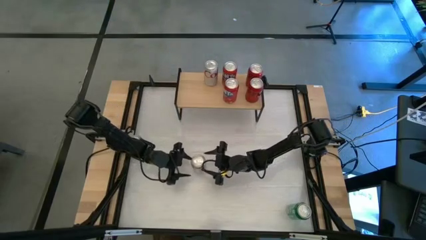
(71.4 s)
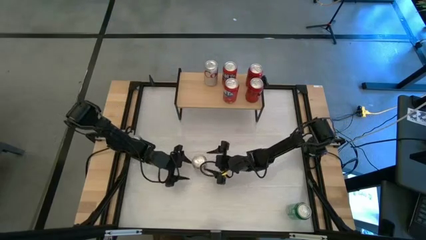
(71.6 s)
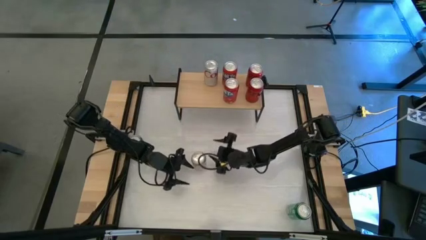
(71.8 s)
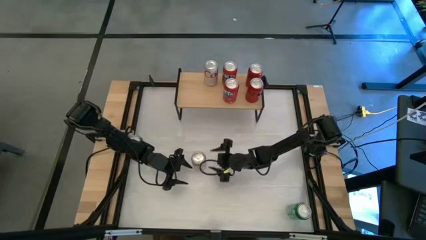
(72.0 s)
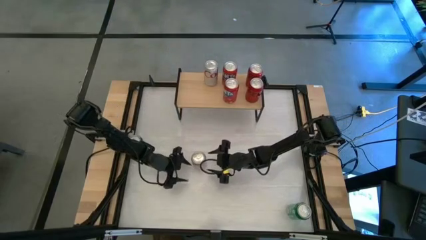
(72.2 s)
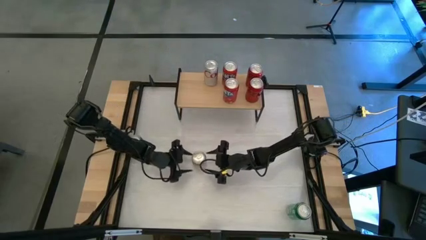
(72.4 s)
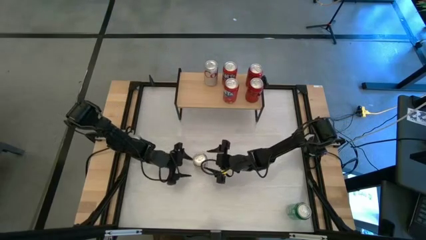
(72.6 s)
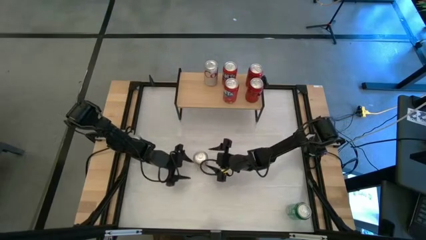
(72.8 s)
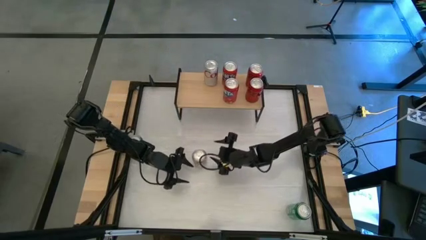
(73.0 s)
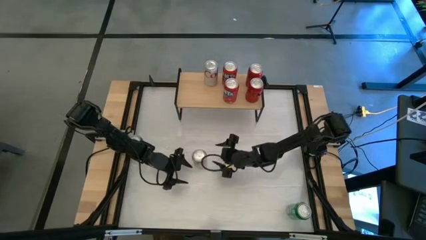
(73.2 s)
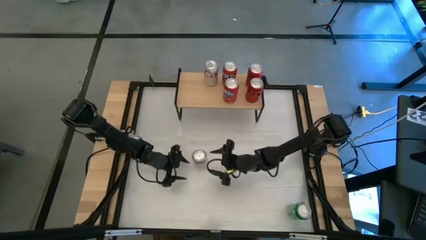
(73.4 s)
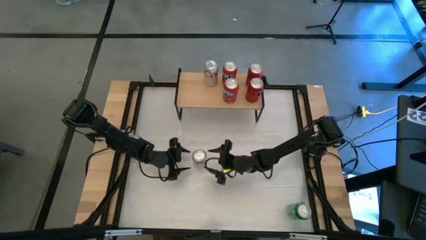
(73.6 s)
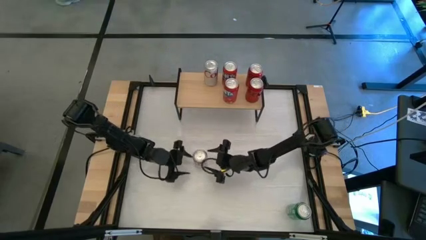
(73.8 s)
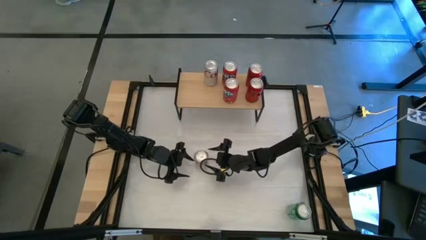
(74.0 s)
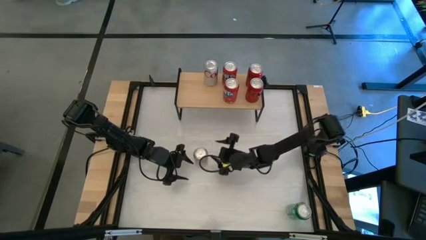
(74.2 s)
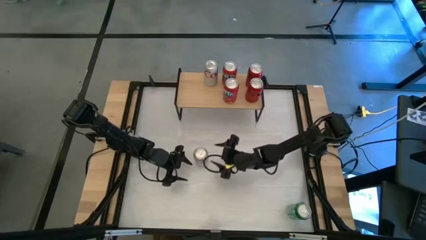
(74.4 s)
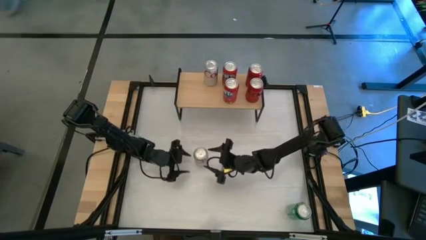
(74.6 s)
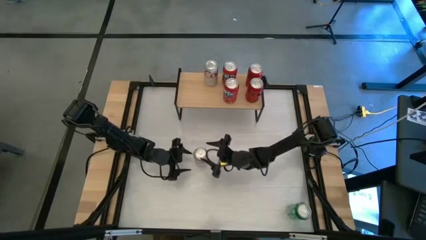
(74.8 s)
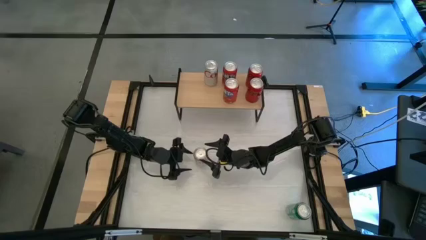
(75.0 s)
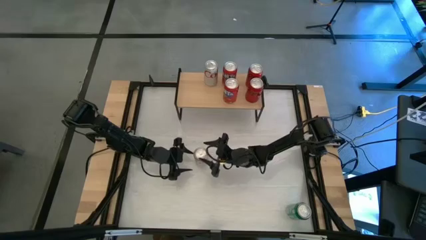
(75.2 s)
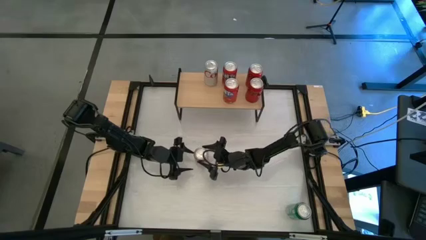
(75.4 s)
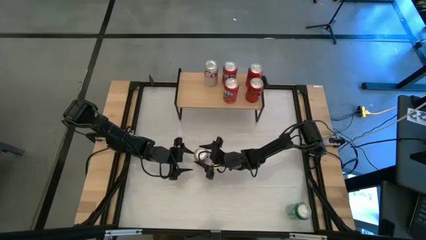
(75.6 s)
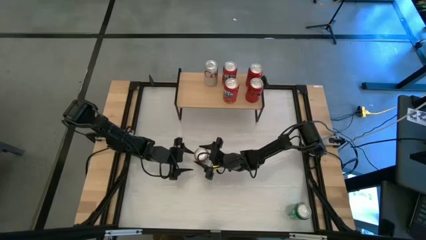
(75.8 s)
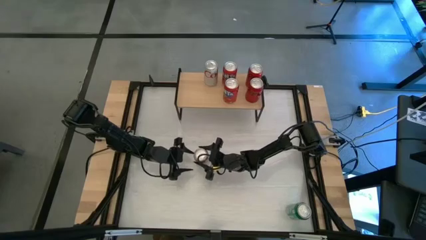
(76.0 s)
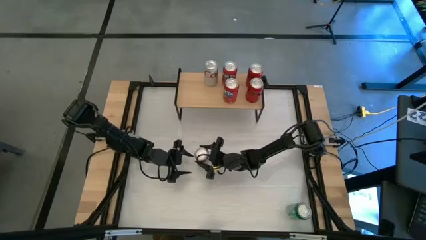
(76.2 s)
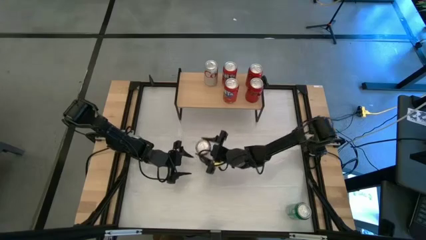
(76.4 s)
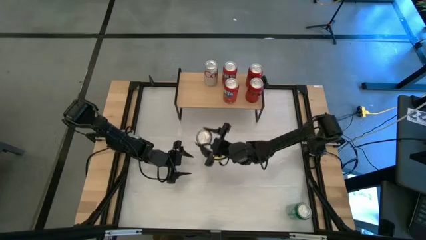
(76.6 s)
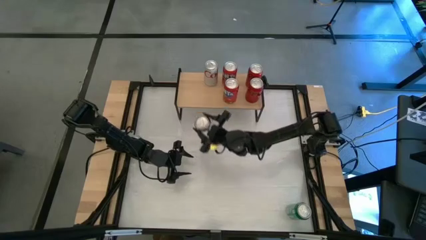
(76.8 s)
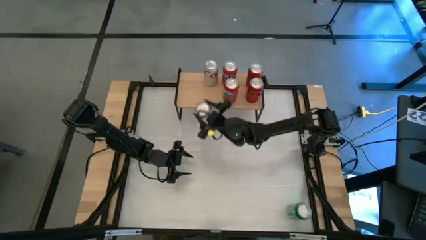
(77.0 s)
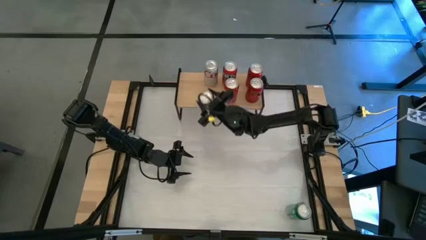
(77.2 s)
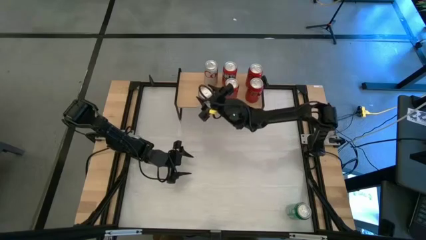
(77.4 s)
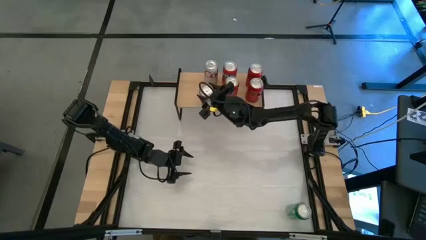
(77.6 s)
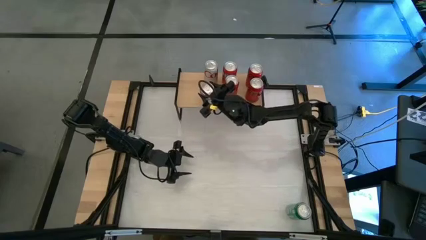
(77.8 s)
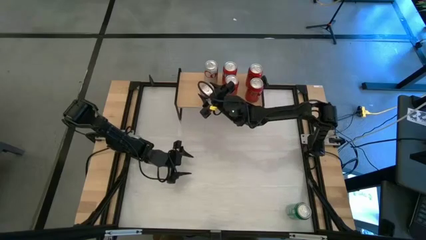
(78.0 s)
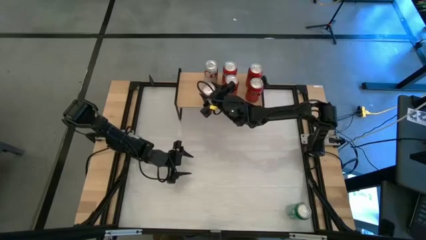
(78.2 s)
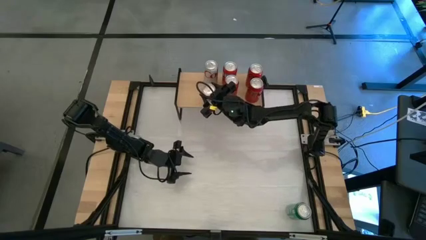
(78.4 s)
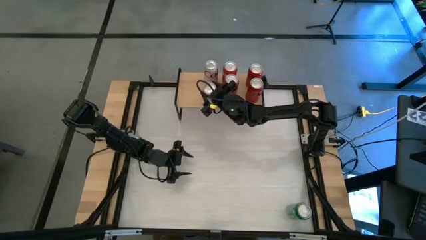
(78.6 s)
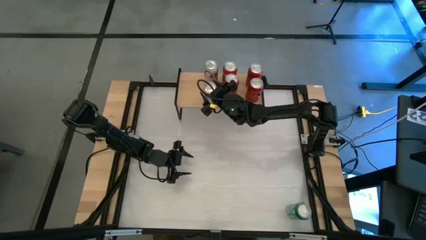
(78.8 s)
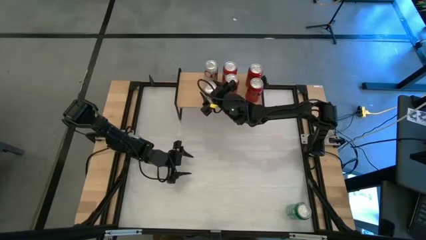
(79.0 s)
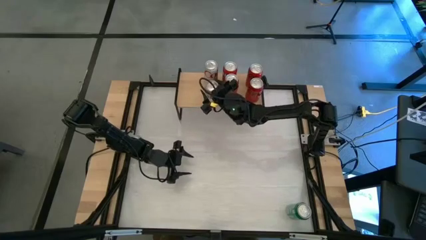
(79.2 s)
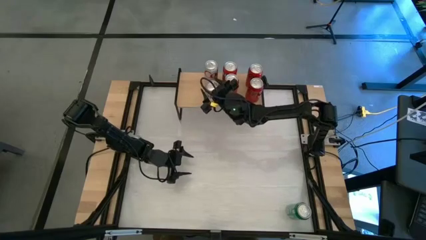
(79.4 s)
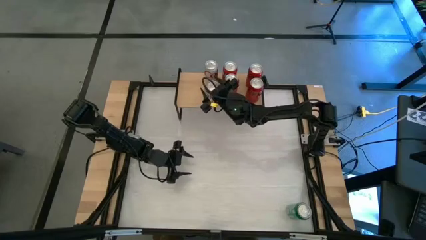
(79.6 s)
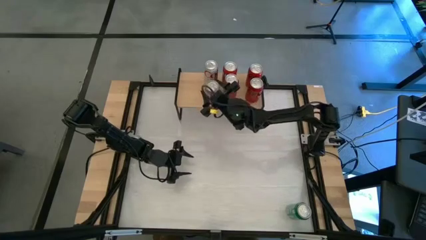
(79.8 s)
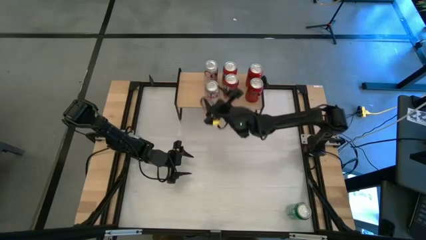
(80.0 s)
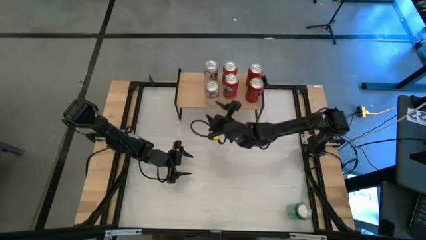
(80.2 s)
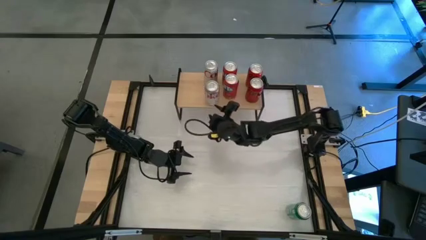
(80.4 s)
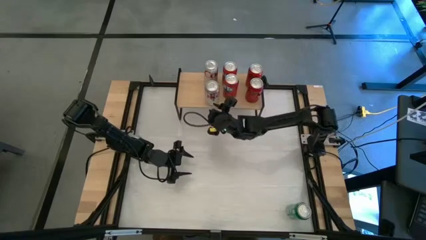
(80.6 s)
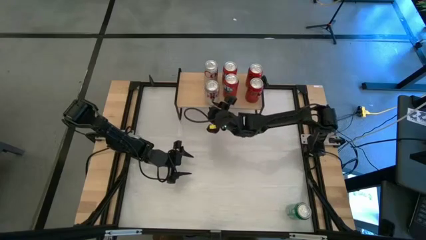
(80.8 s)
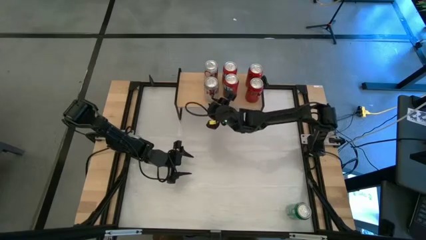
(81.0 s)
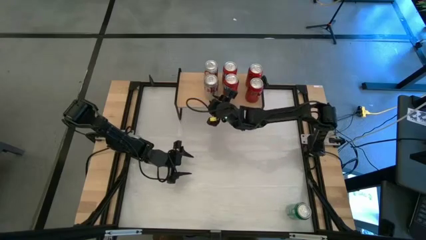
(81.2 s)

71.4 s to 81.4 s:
Task: Place canned beverage on shelf
Put the silver soda can on the shelf and align with the other silver soda can

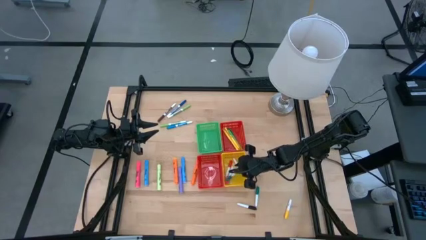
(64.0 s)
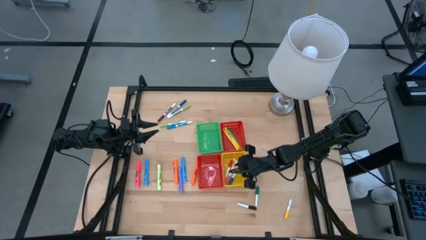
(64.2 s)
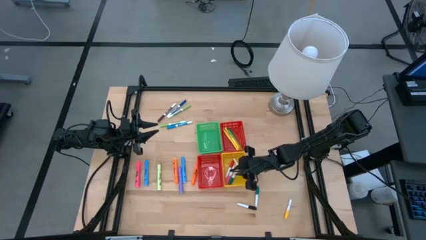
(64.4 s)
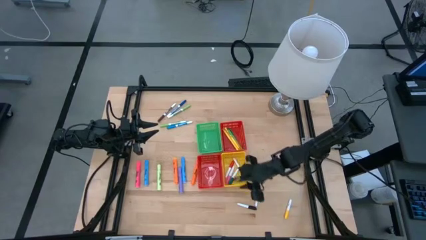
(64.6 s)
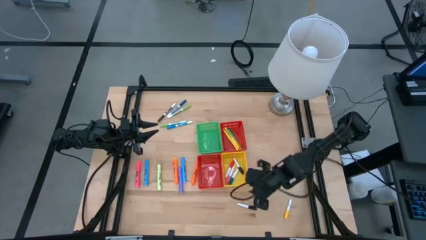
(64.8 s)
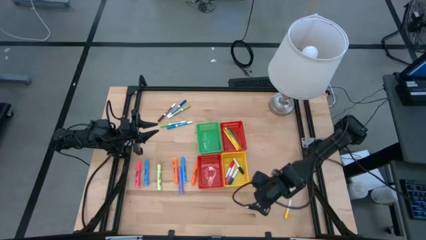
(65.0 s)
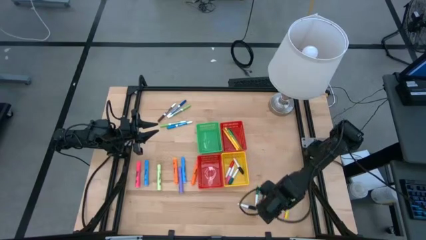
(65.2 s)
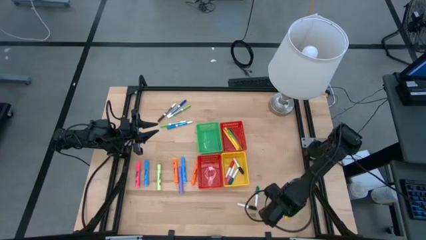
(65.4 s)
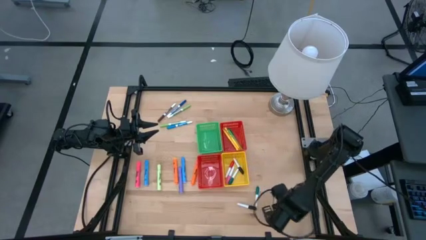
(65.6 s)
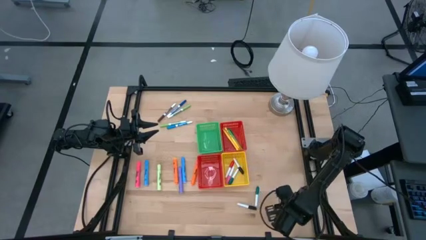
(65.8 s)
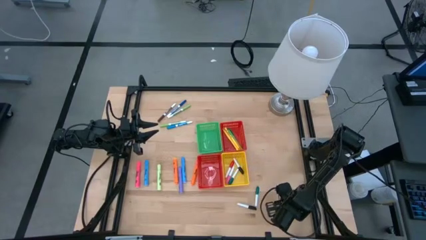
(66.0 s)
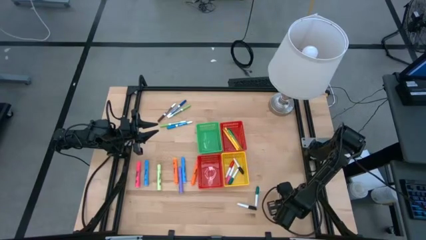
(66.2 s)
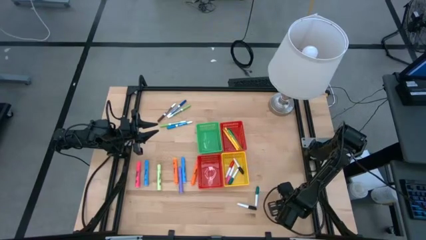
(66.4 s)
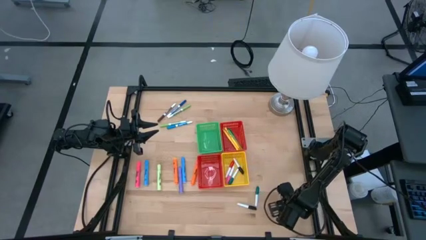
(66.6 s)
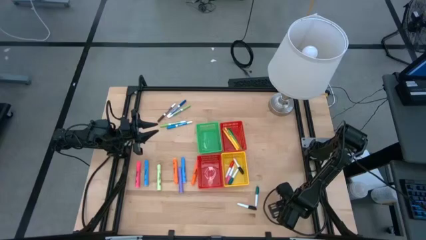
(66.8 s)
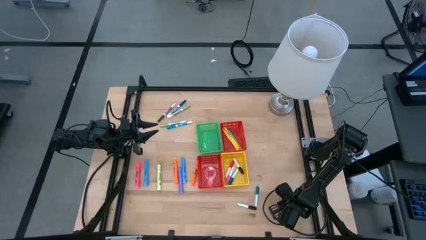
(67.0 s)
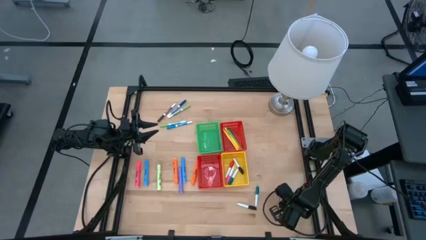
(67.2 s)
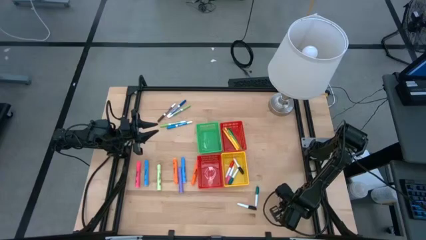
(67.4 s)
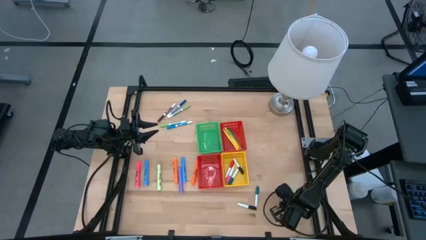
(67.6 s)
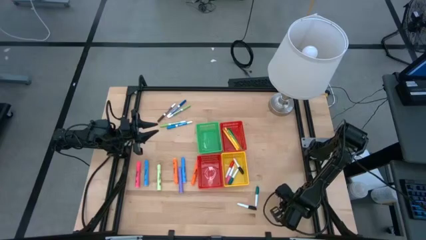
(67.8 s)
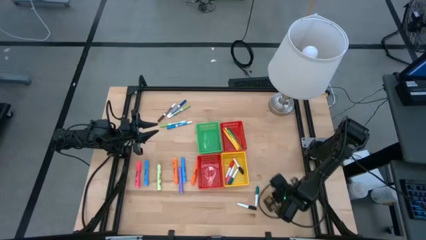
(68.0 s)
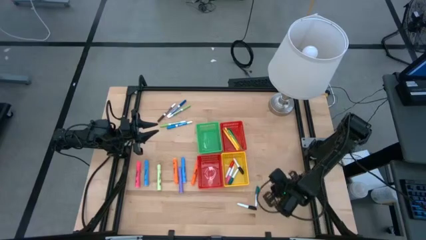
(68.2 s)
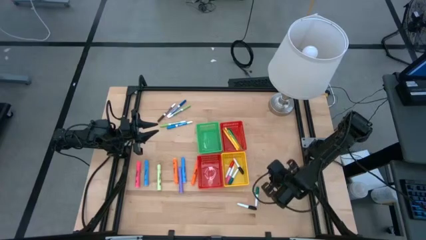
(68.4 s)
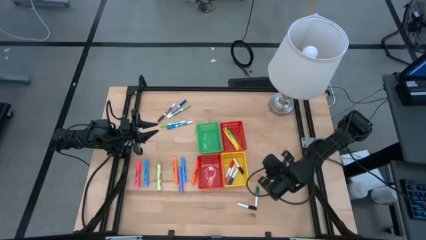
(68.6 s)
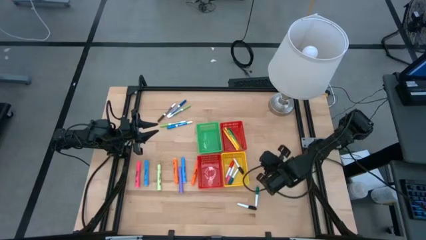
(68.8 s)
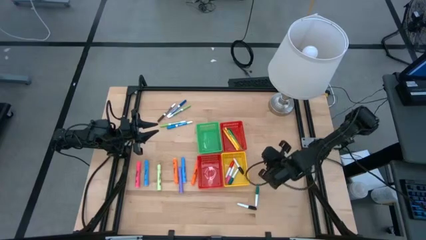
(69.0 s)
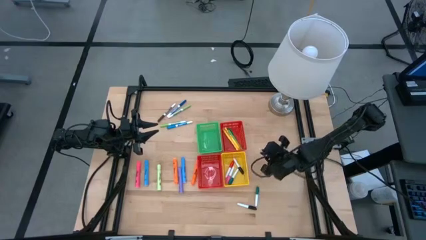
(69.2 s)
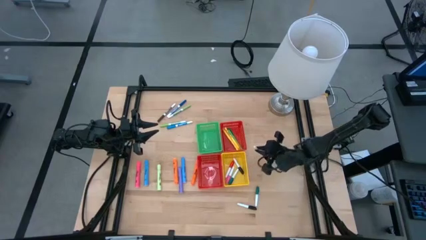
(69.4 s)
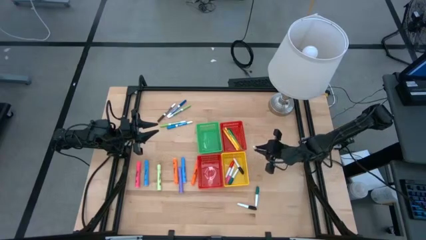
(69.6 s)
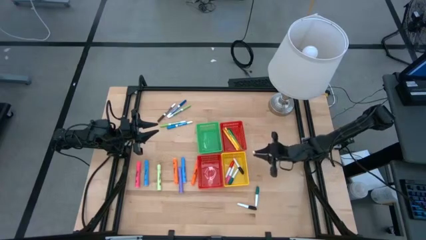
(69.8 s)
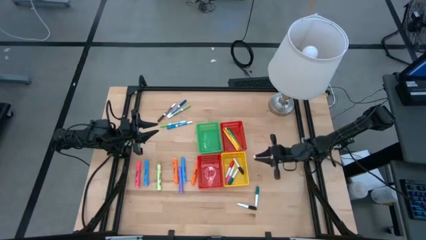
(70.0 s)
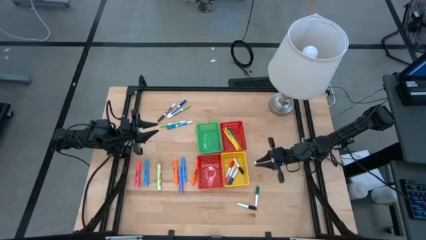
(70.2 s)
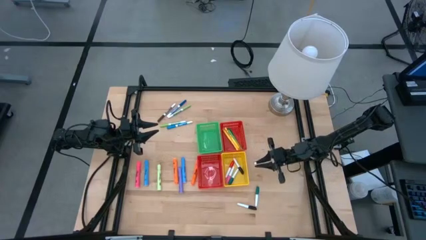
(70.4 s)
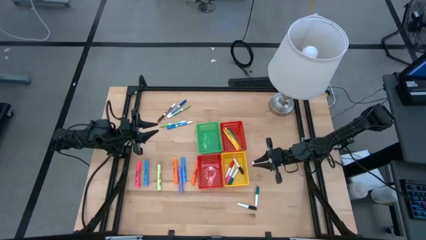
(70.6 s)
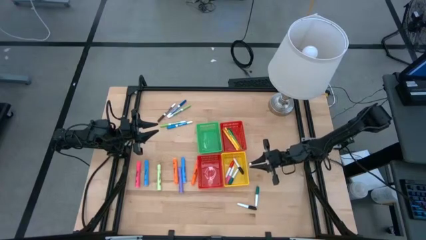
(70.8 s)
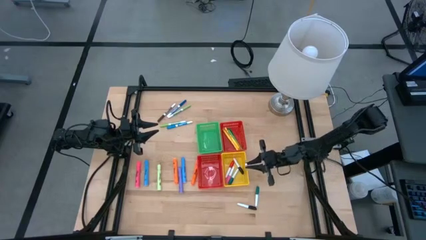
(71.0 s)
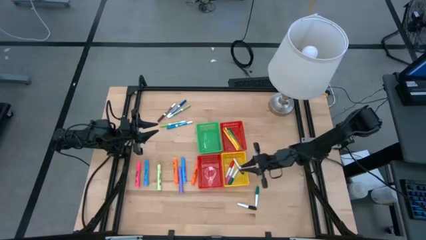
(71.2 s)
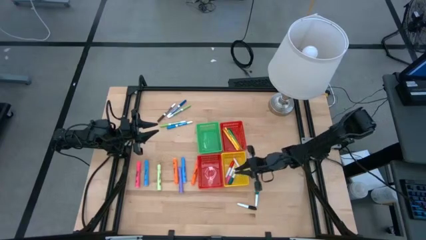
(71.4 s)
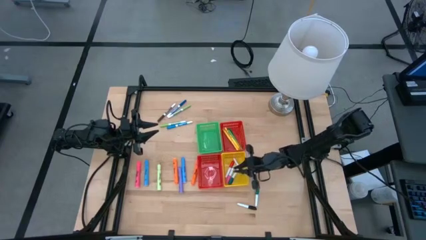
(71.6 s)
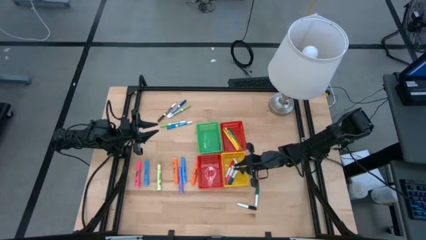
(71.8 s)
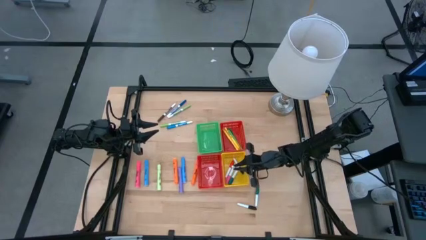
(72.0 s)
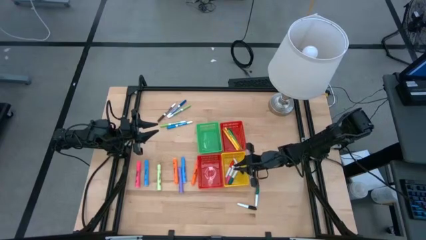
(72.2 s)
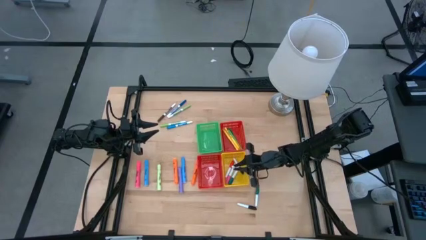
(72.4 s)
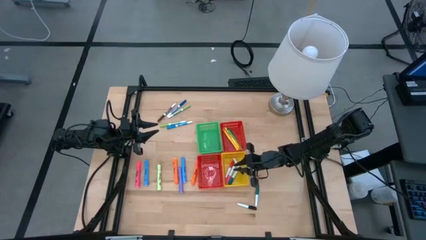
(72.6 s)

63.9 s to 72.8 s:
Task: Pick & Place Markers
Put the small yellow highlighter pen into the yellow bin
